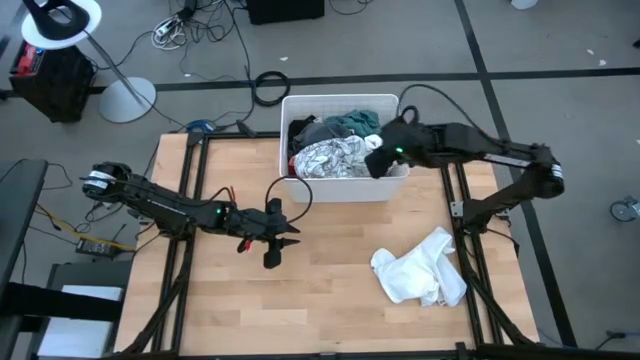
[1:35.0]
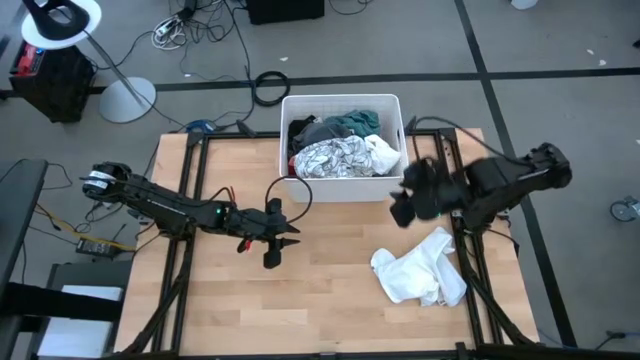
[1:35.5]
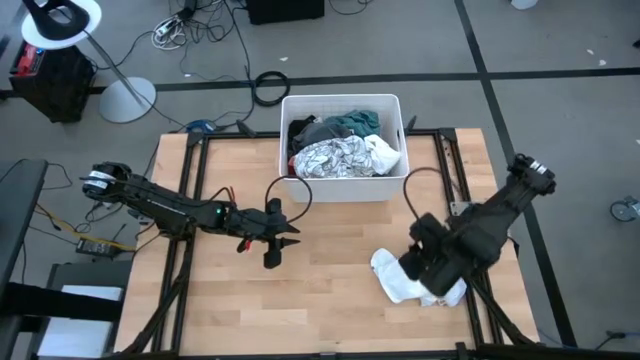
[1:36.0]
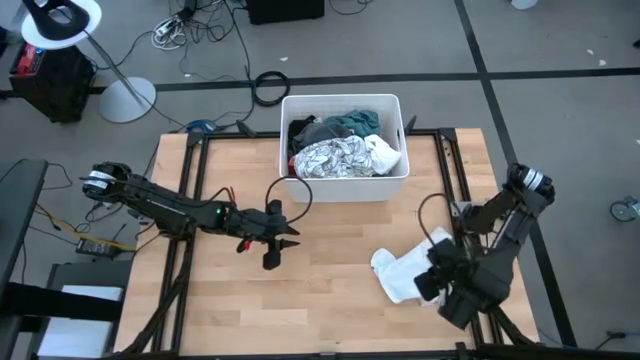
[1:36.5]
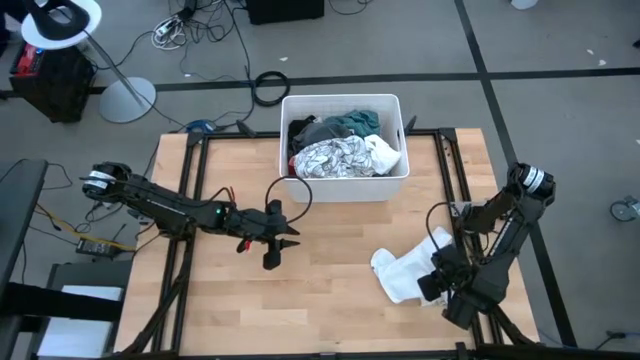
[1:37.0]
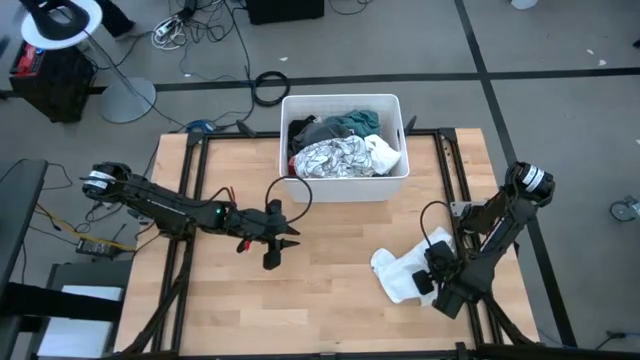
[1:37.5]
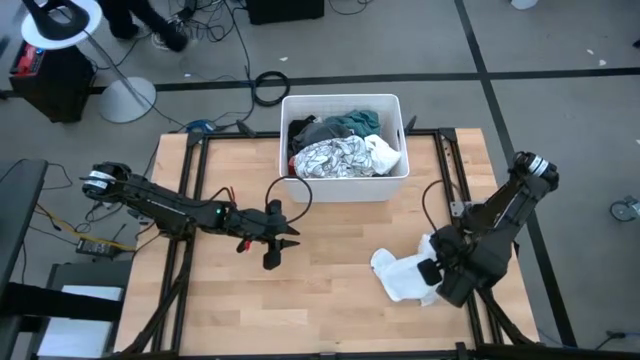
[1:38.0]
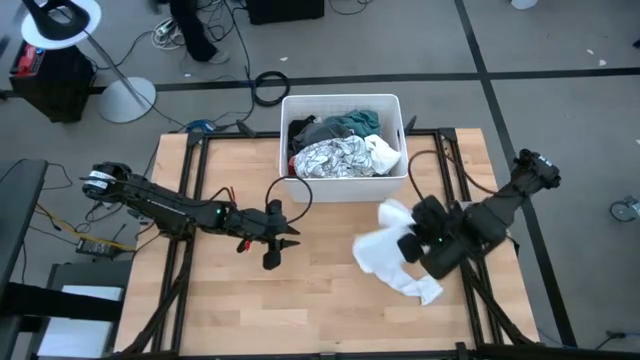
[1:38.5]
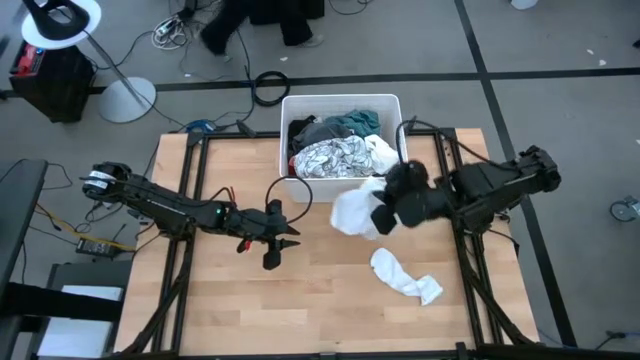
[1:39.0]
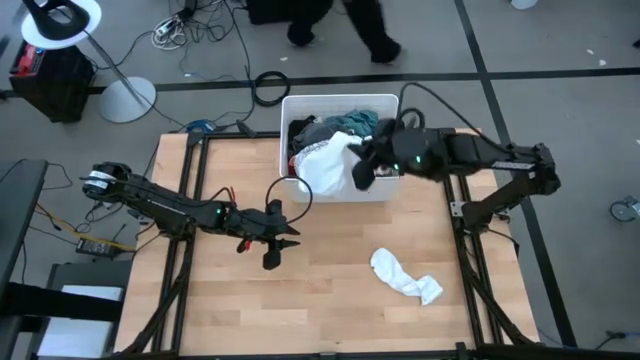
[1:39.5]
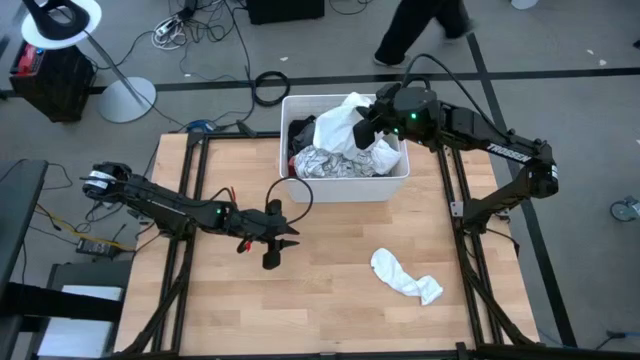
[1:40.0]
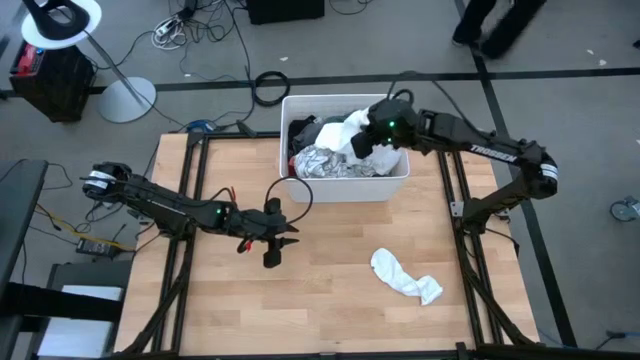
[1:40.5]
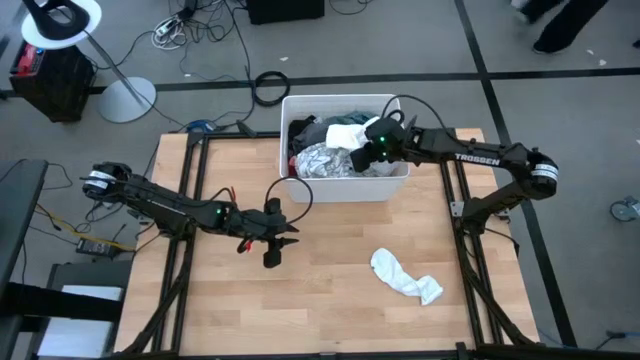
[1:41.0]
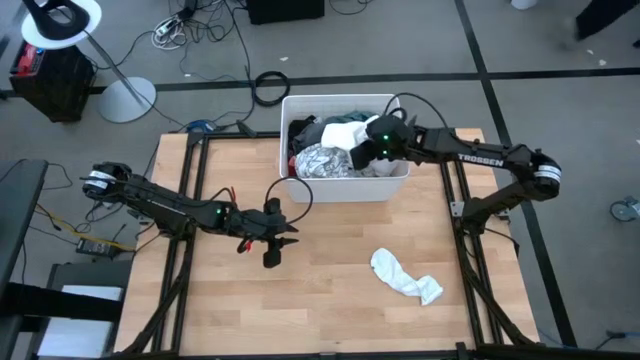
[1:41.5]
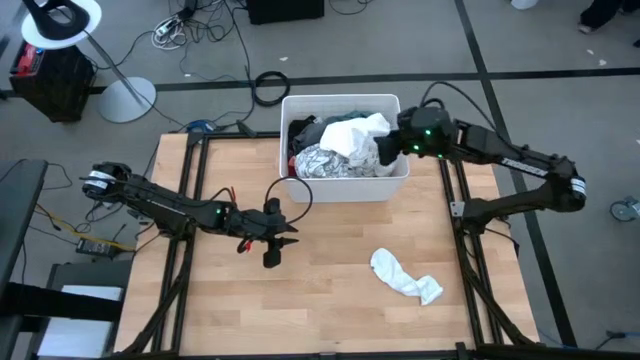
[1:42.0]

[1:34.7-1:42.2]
Task: Sort clothes
Put the white clothes into the white laundry bin

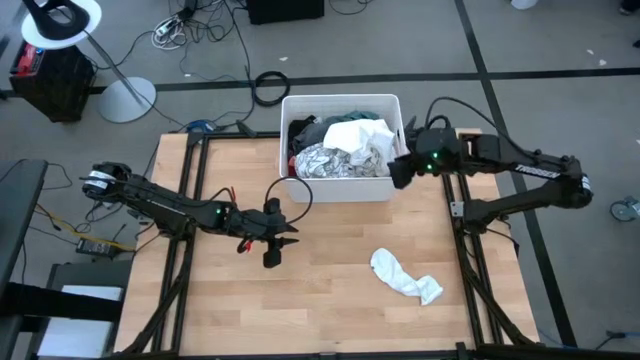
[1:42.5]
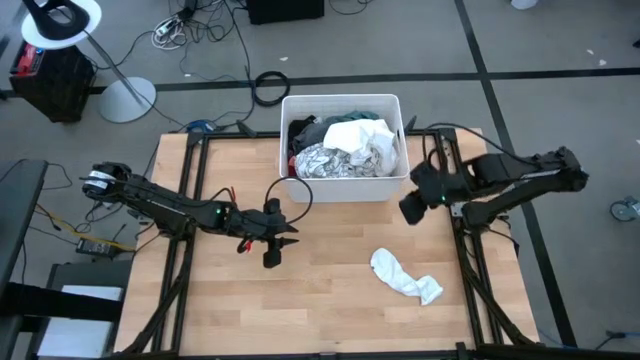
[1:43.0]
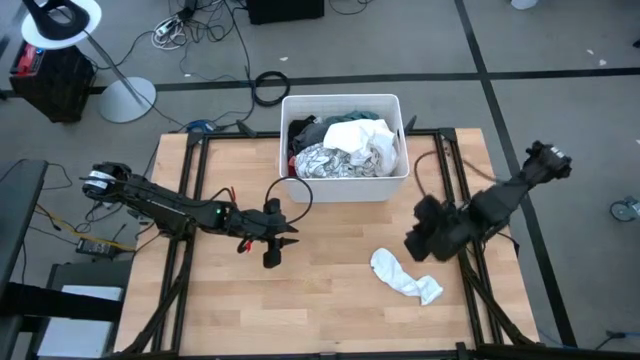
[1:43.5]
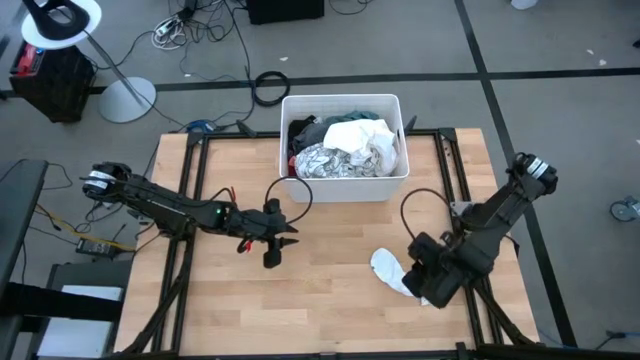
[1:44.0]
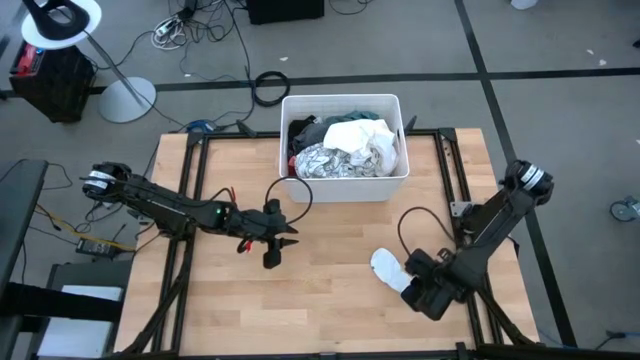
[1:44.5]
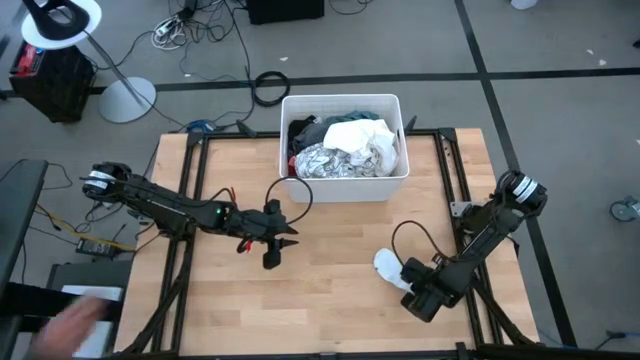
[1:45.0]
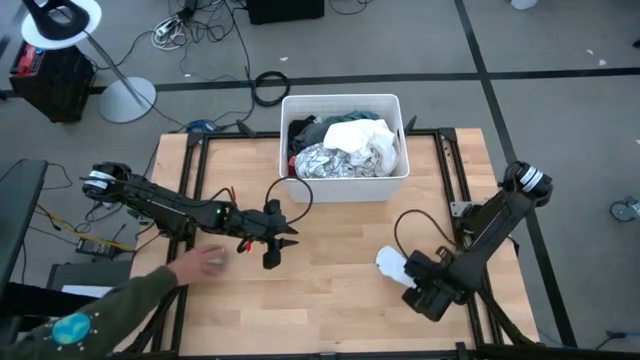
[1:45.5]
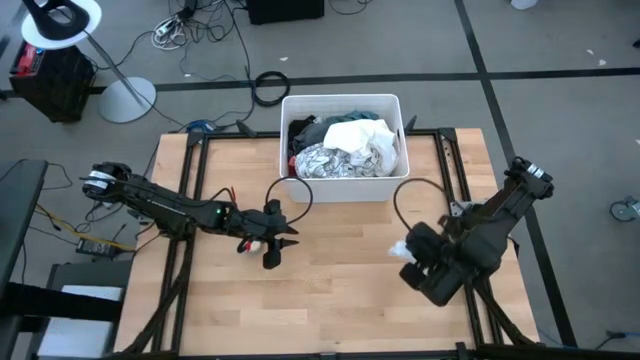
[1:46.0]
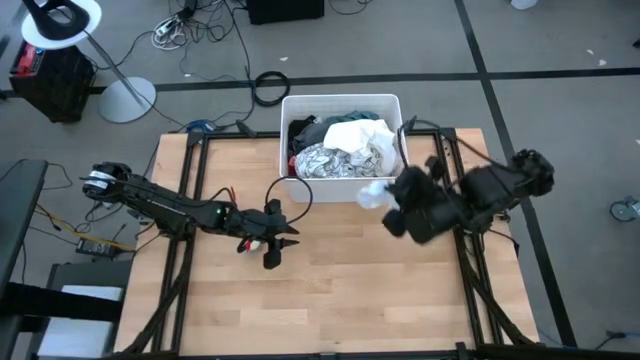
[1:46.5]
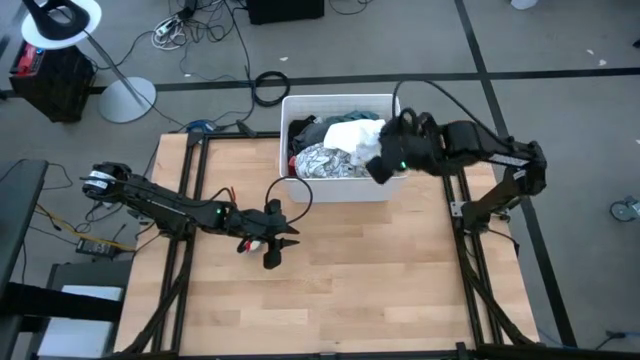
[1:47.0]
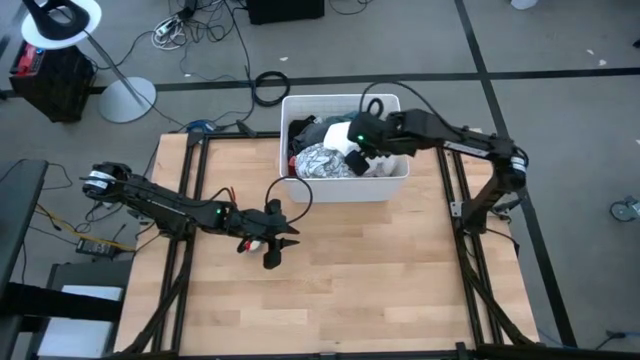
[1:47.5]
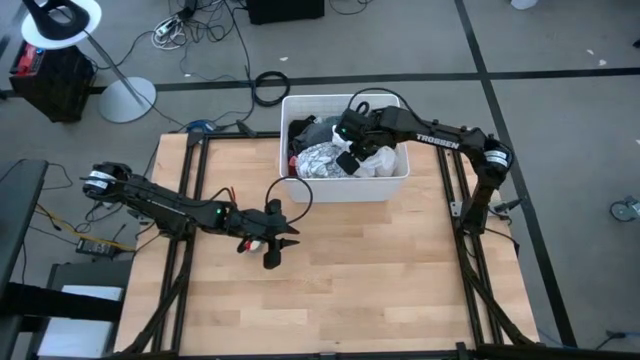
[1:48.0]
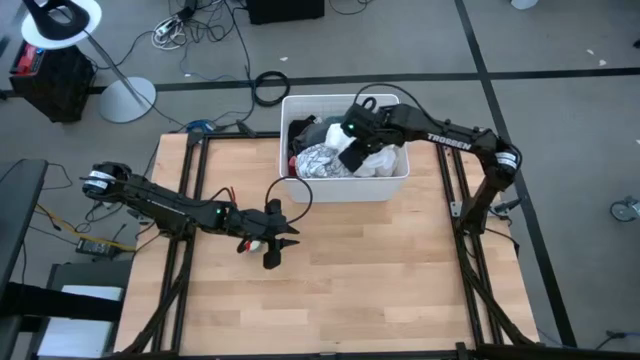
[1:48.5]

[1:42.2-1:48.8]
Put the white sock into the white laundry bin

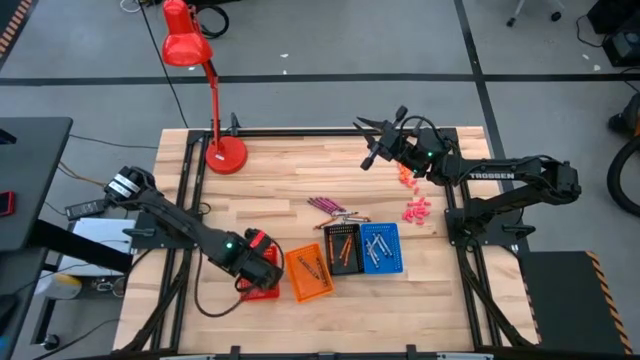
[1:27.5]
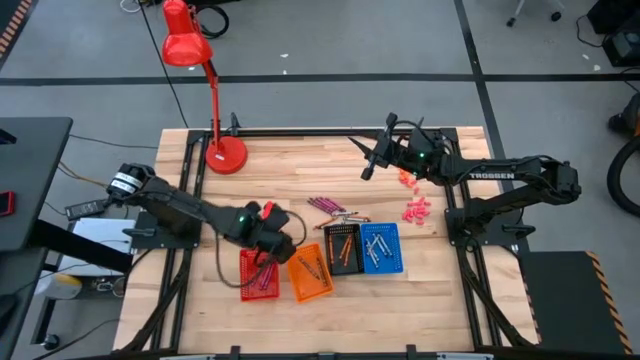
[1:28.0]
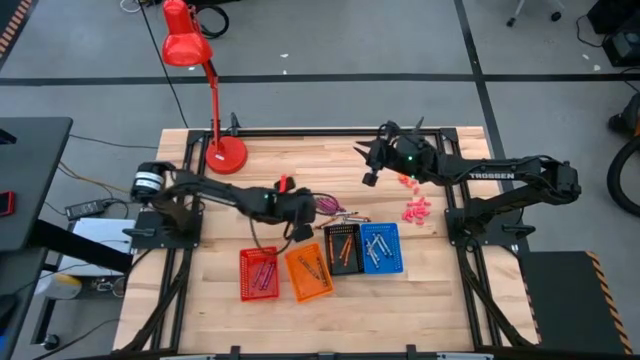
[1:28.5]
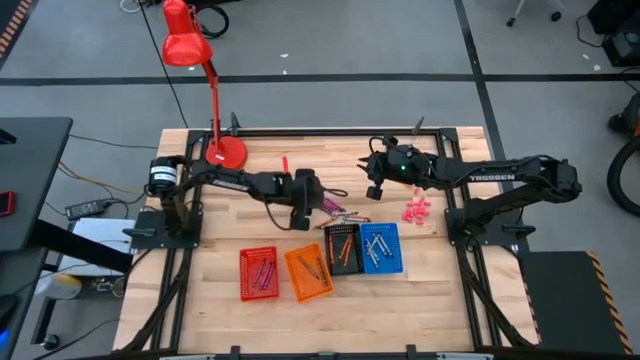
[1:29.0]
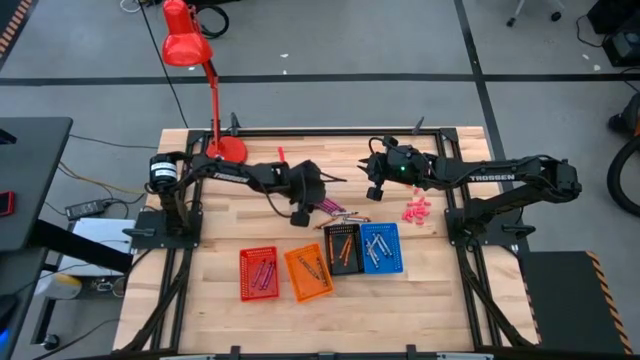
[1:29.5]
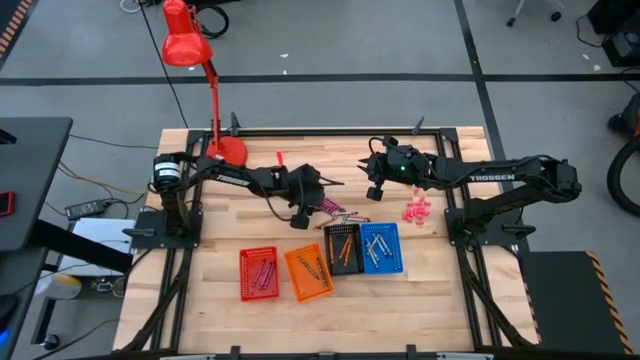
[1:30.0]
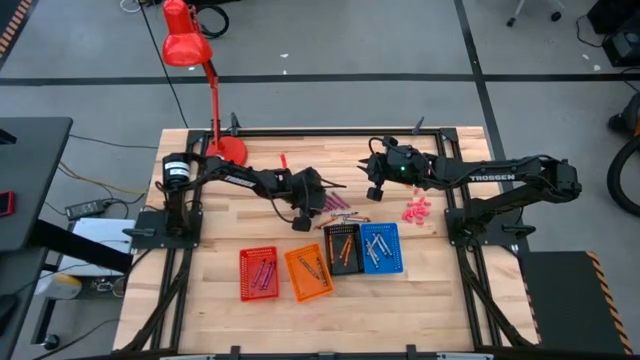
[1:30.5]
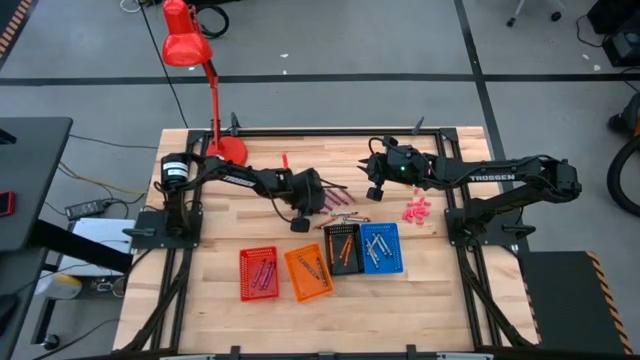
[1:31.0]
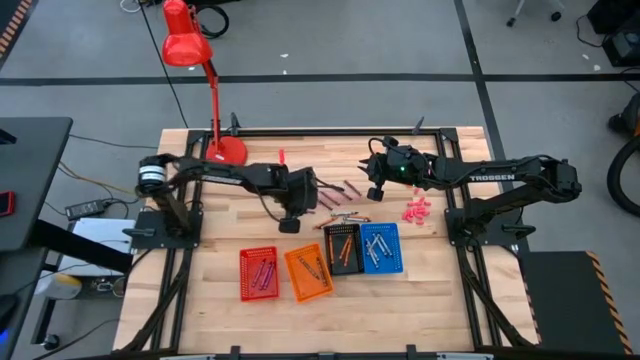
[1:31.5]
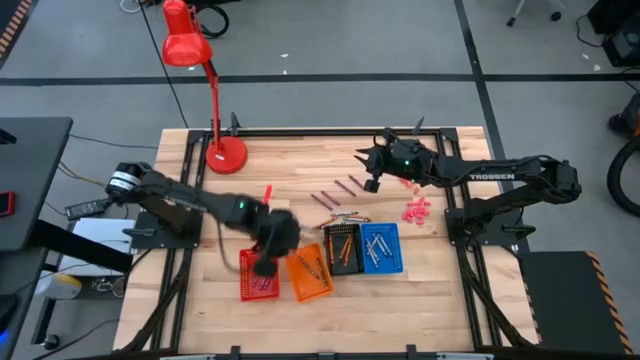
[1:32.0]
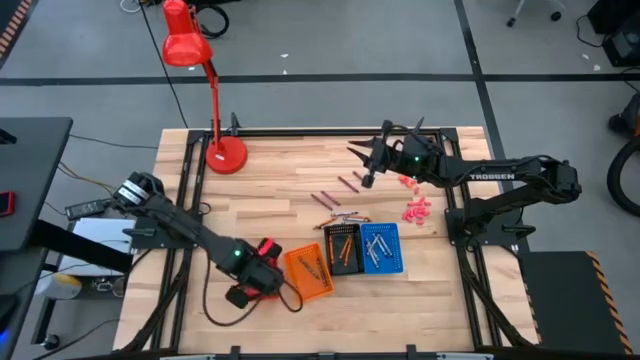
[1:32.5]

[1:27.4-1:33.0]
Task: Sort crayons
Put the pink crayon into the red bin

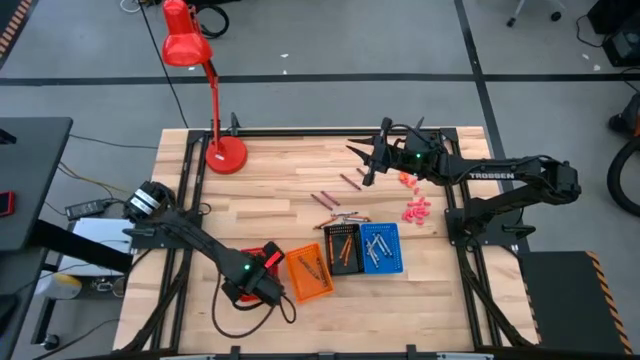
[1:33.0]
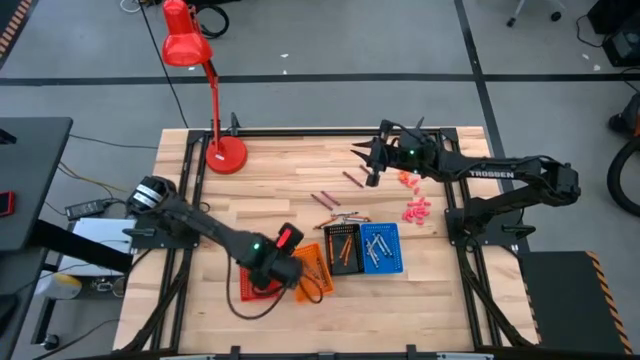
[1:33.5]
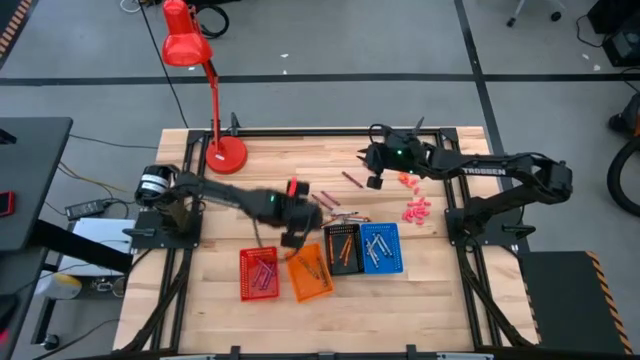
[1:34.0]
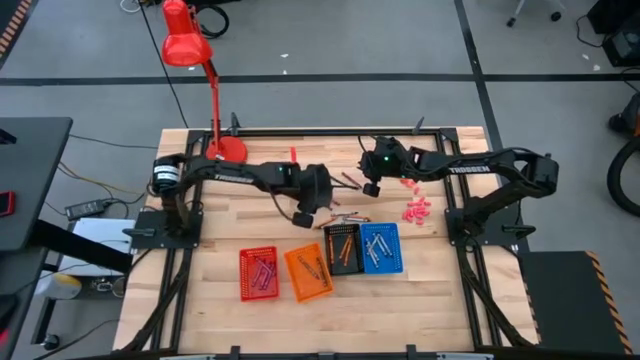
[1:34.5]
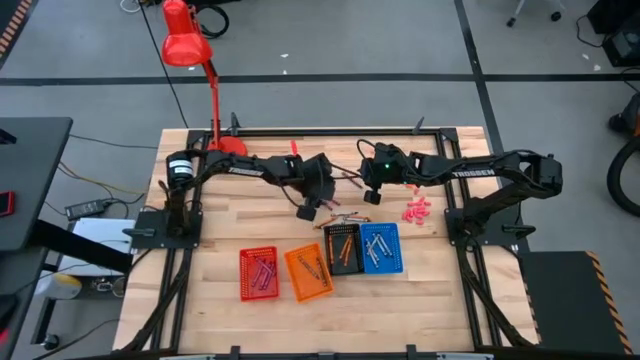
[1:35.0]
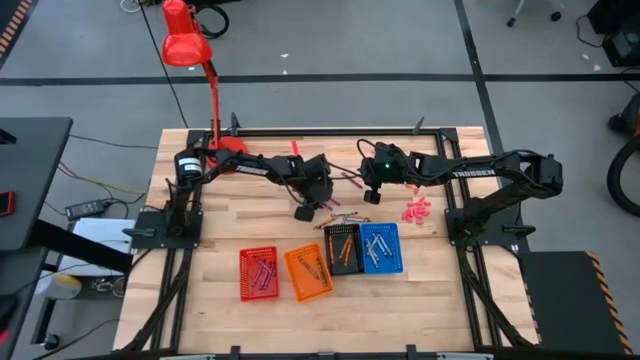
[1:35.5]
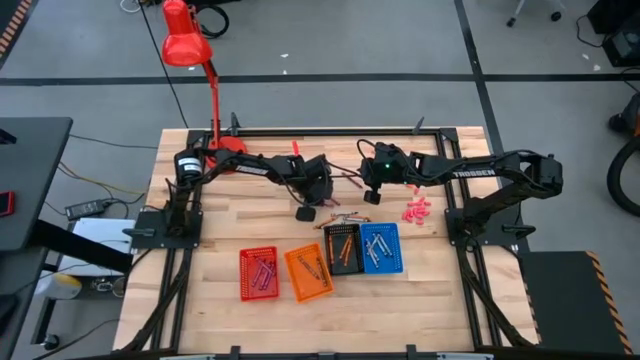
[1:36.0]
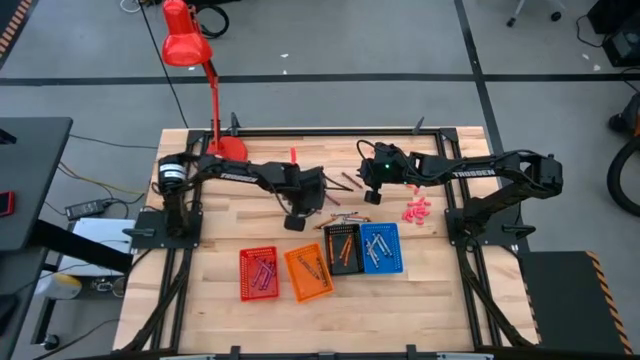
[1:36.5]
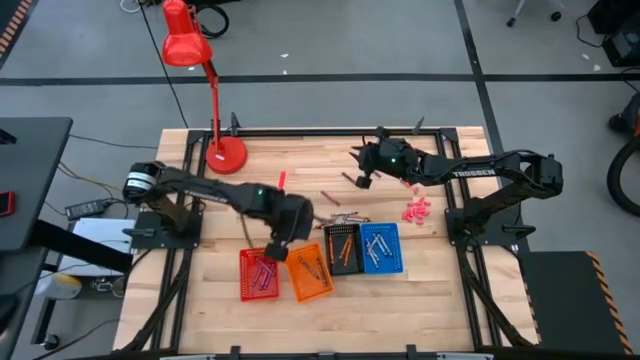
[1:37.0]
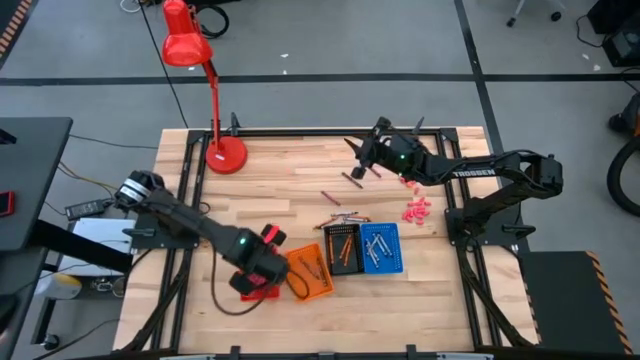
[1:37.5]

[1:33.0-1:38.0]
Put the pink crayon into the pink bin
